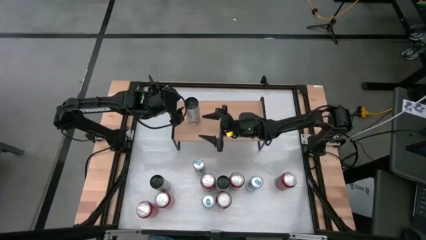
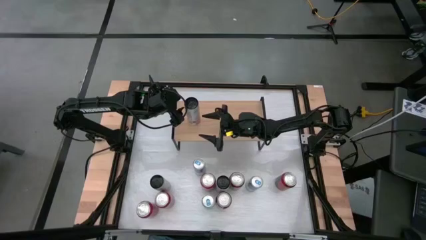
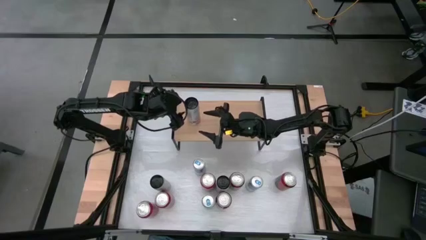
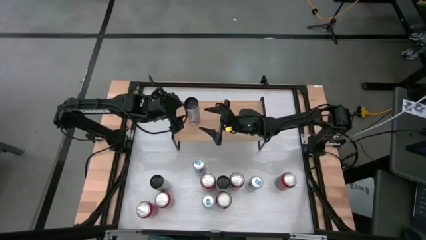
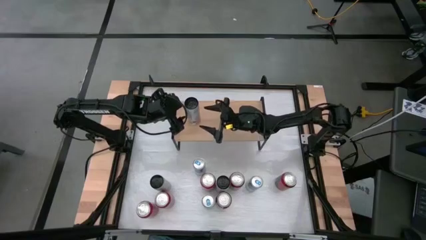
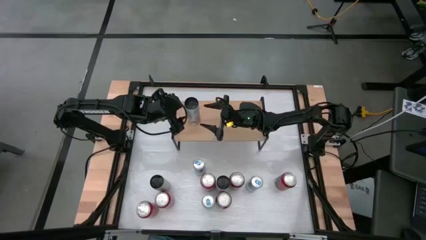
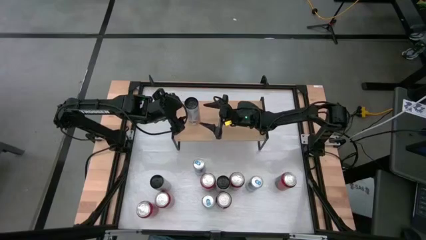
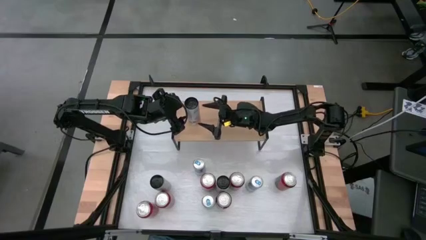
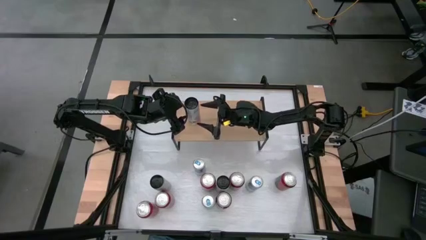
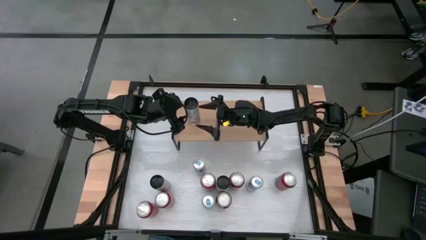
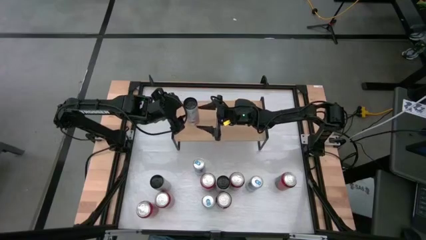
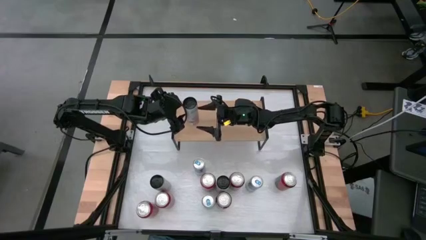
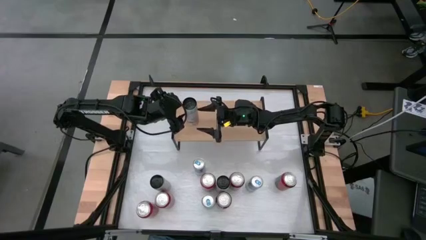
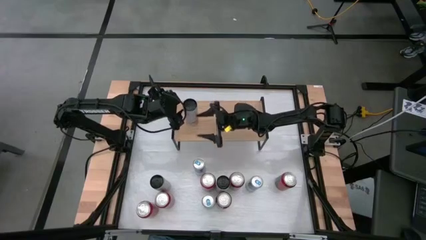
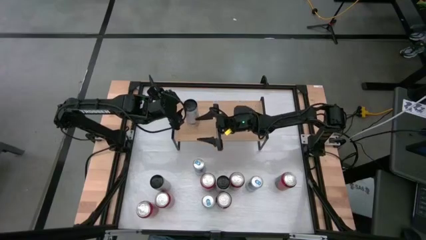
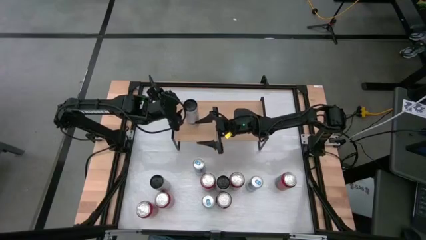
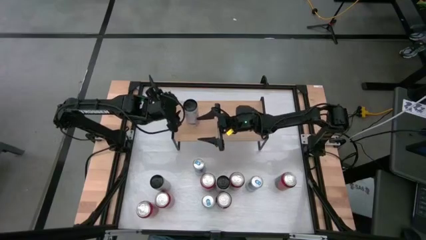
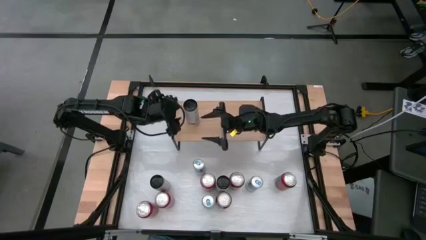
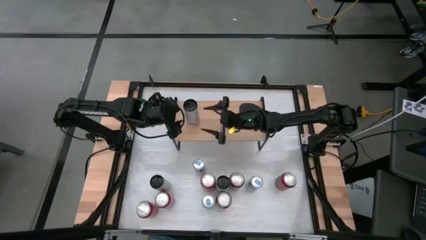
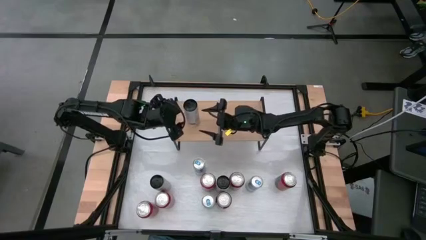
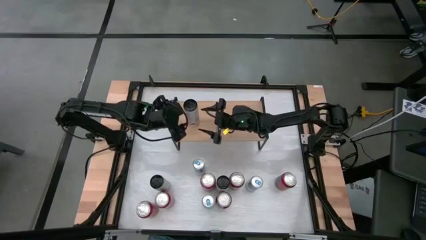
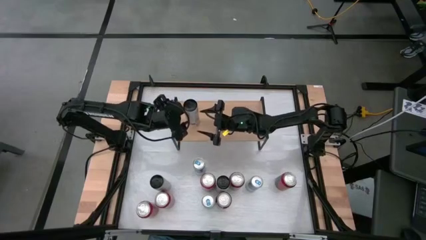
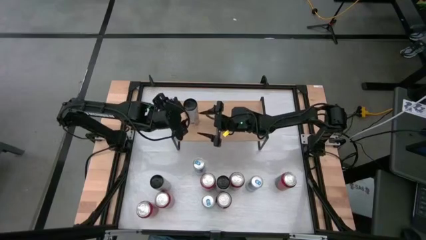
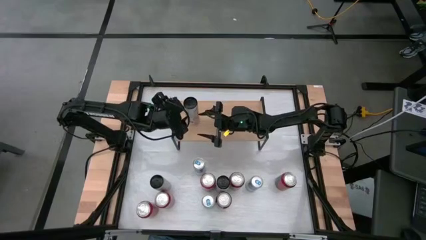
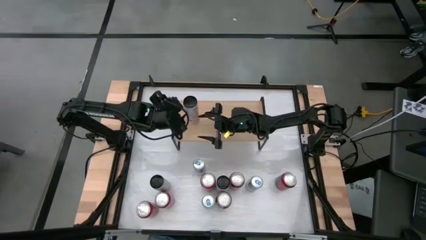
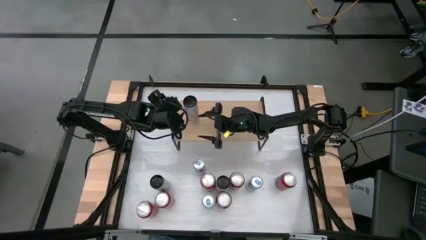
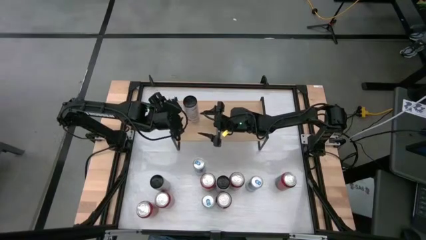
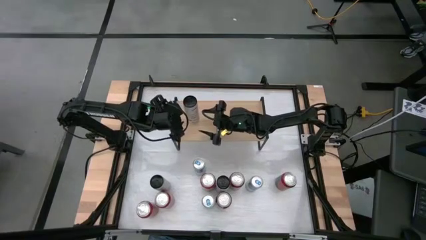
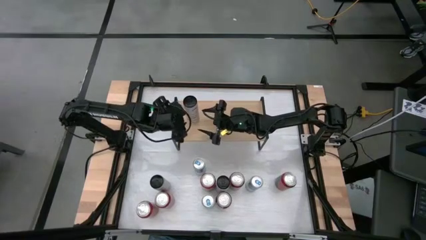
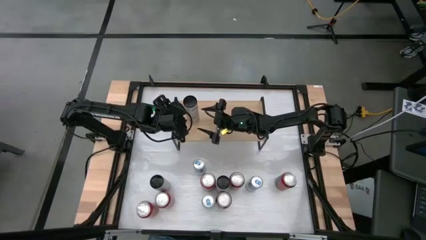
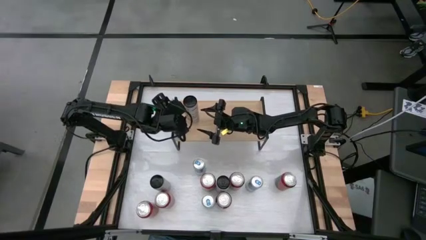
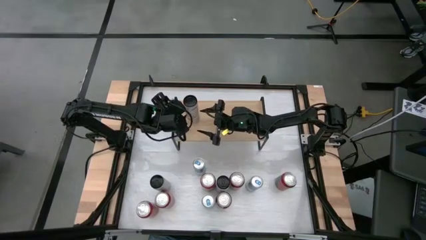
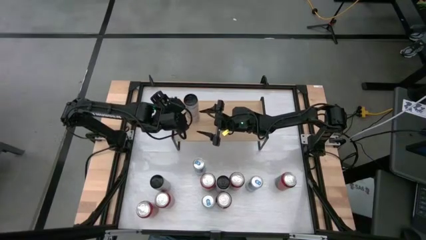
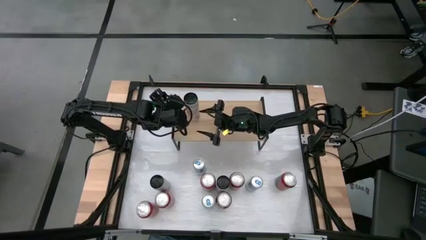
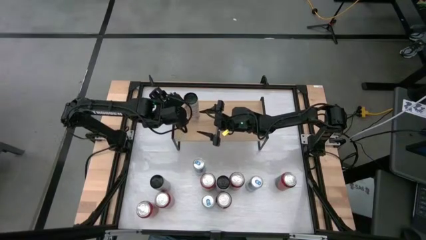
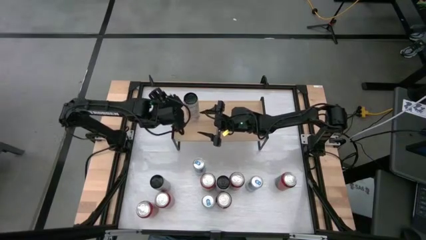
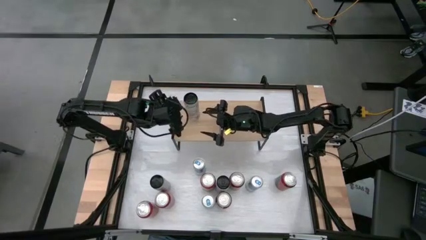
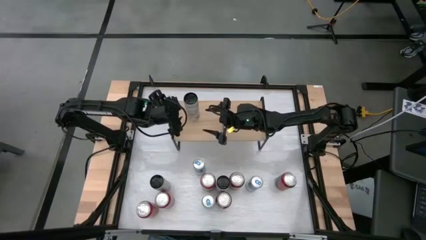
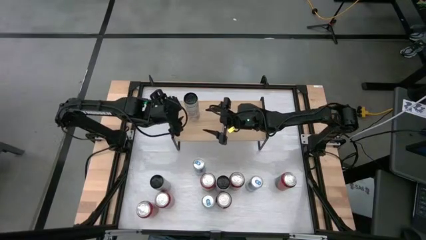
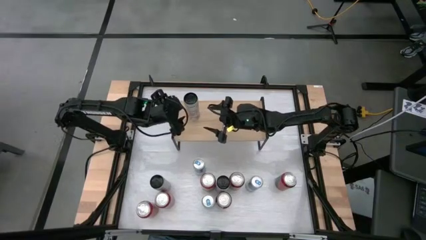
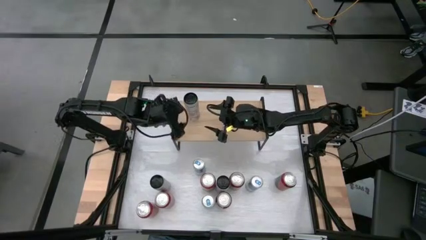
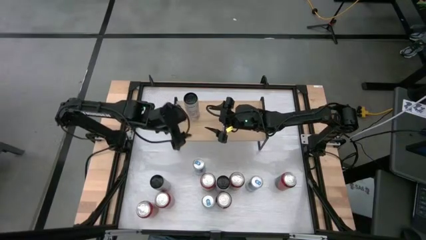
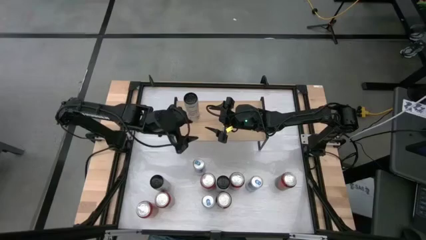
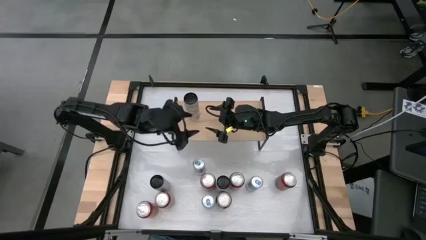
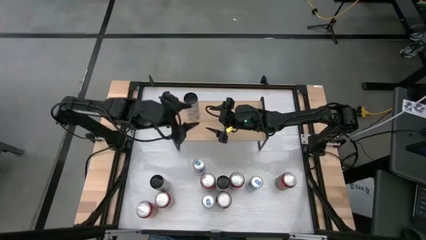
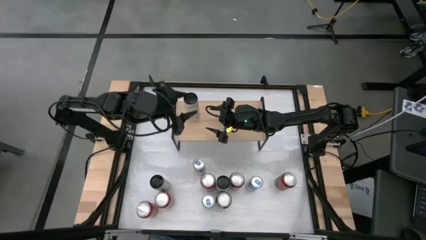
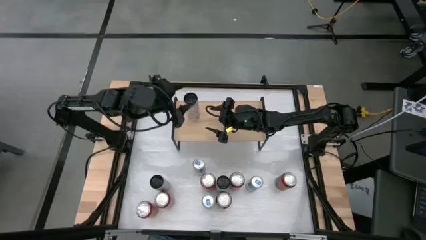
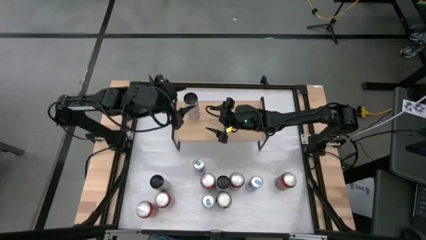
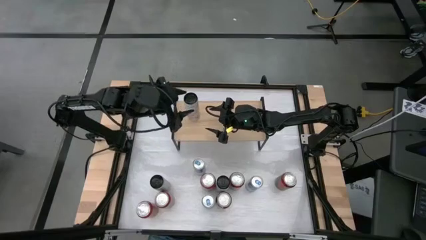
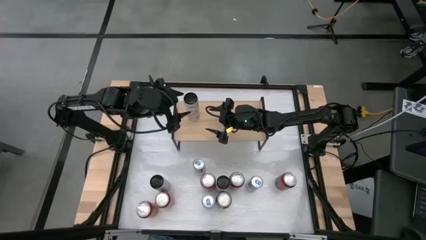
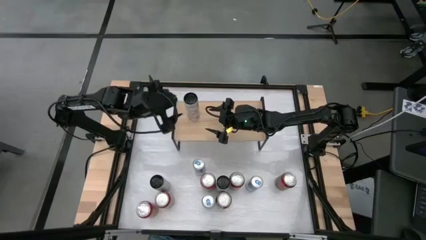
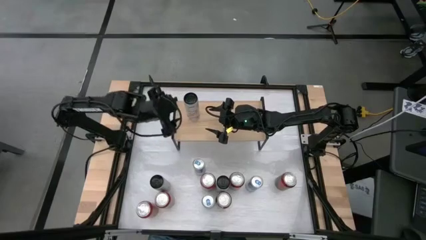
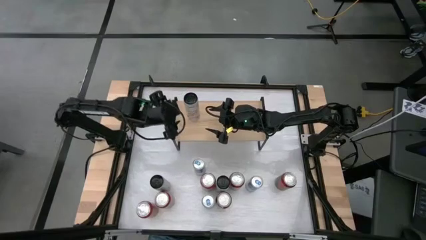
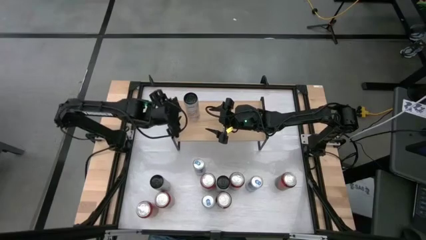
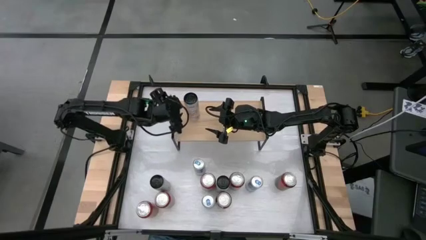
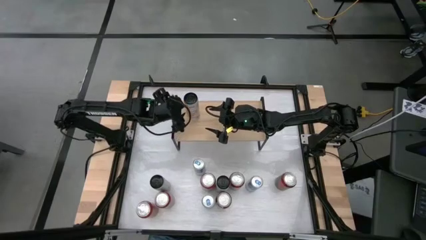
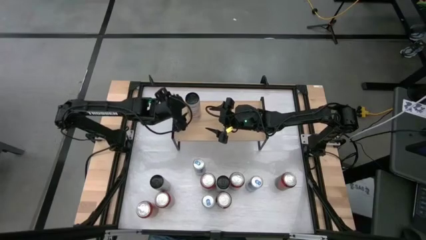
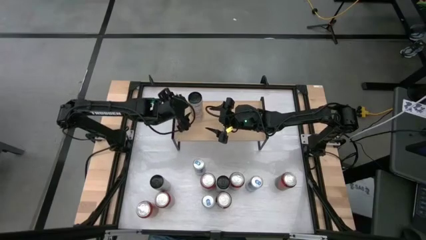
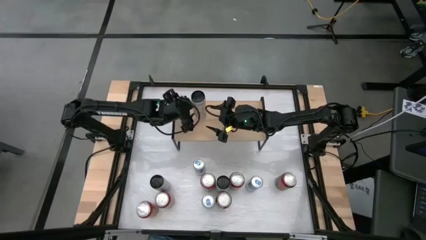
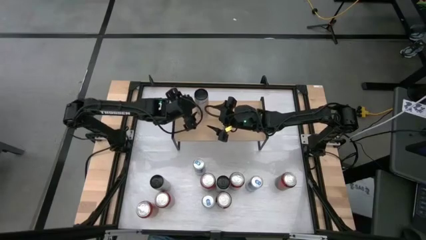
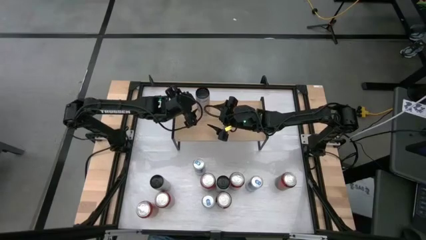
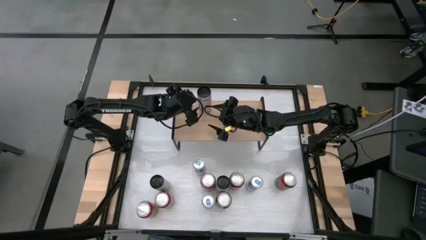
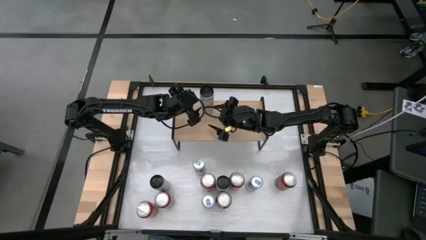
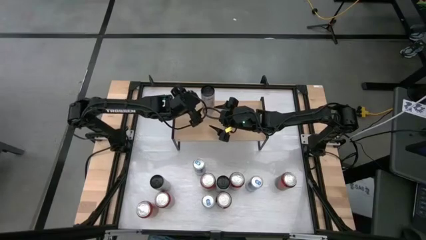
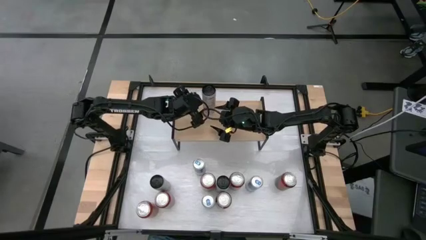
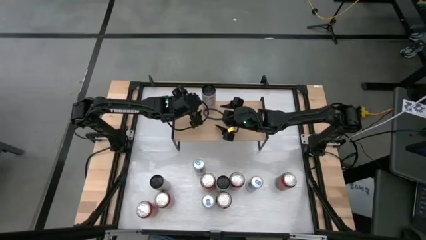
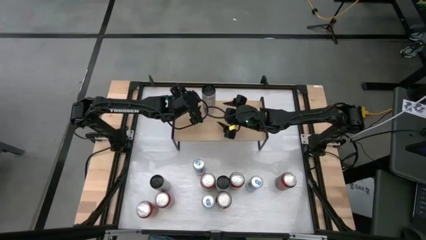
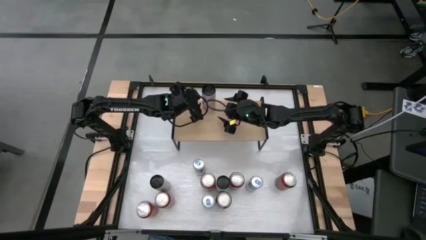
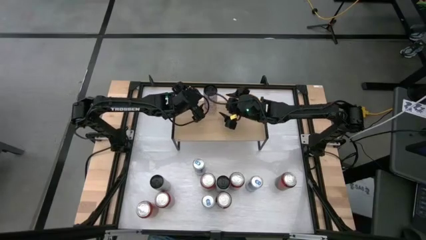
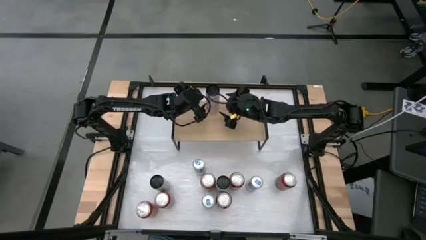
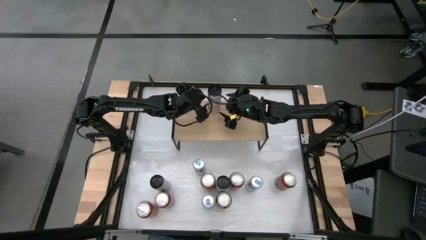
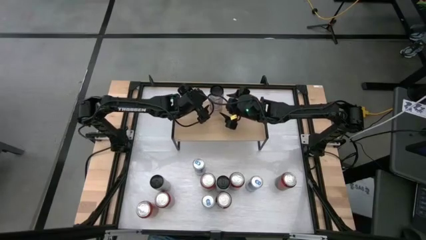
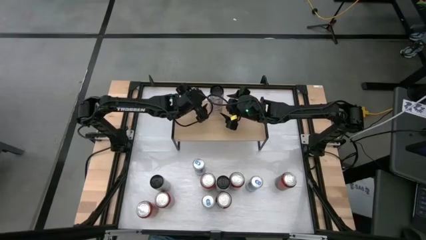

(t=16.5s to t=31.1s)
Task: Place canned beverage on shelf
Put the center white soda can on the shelf
